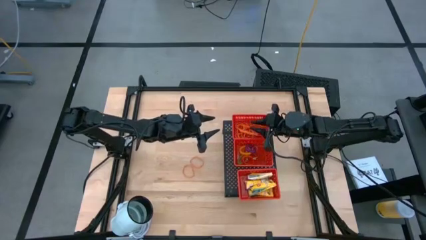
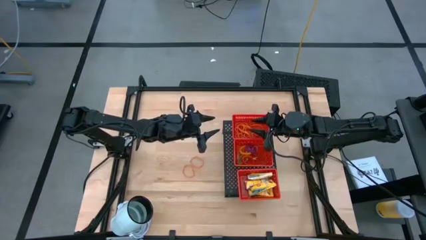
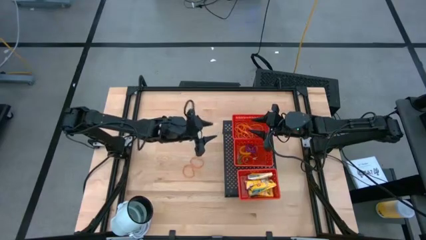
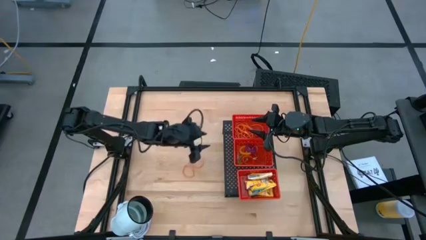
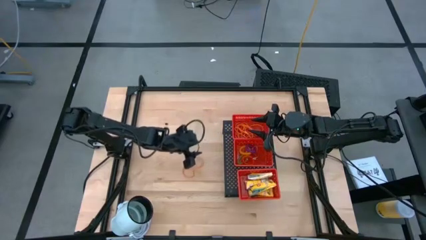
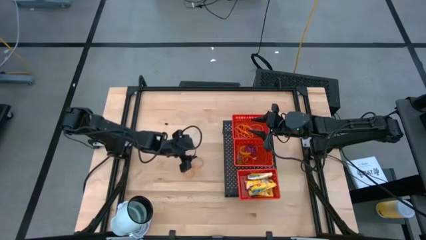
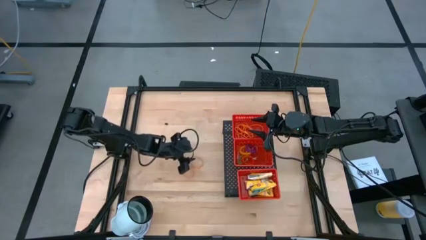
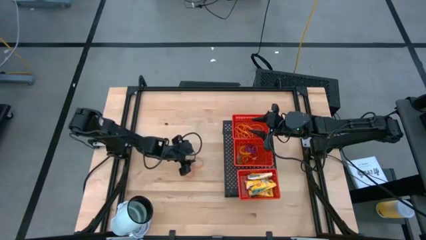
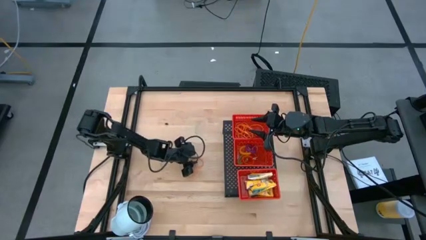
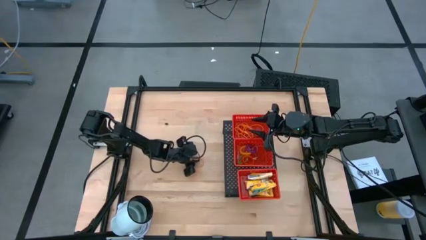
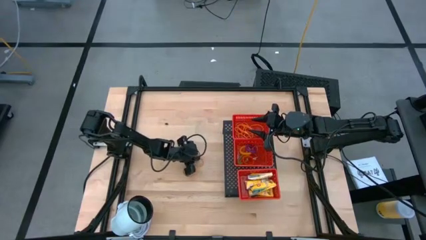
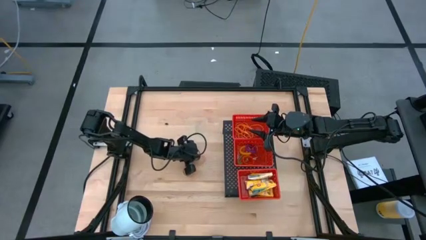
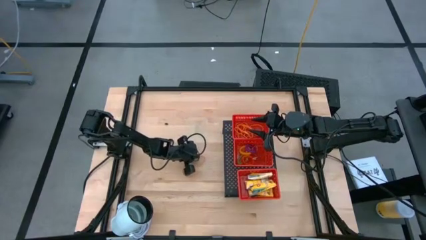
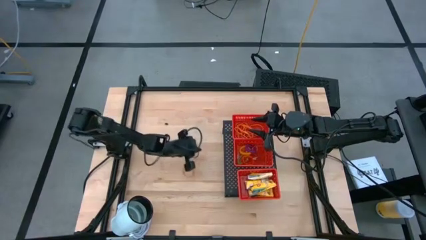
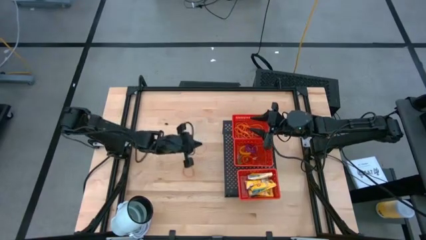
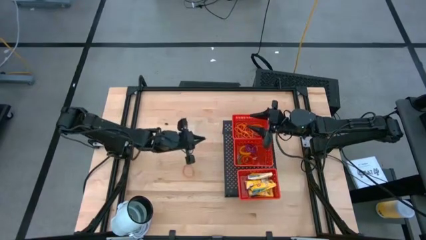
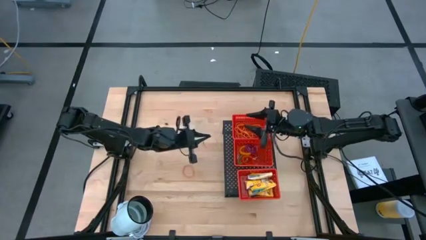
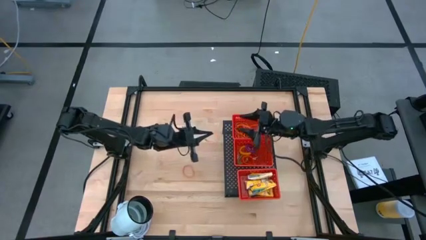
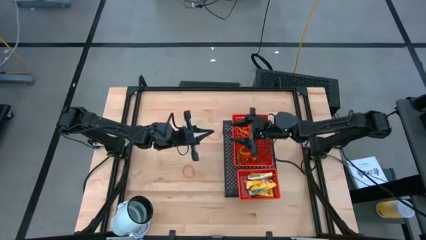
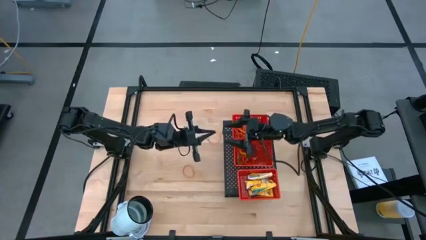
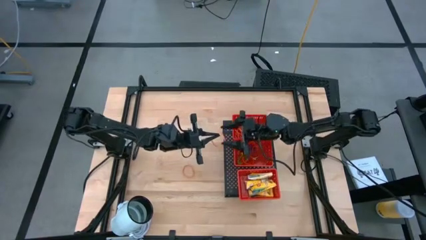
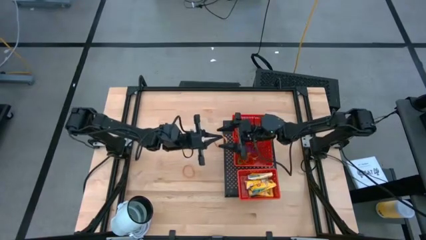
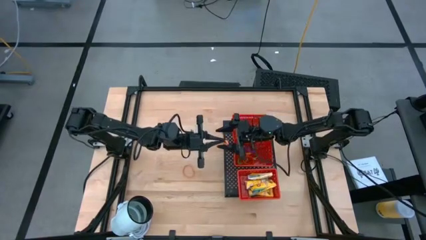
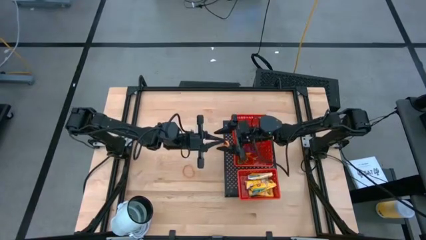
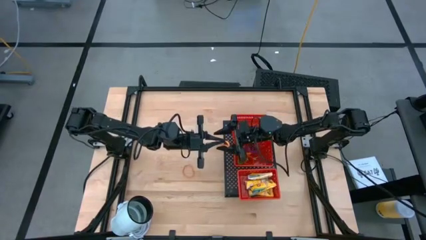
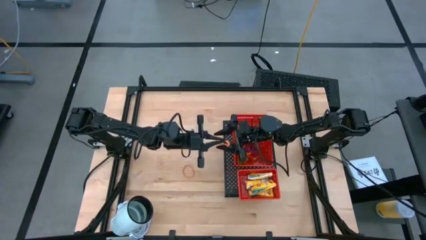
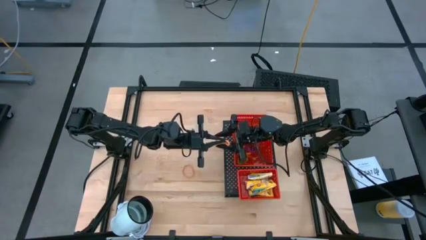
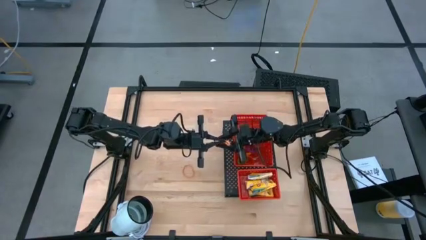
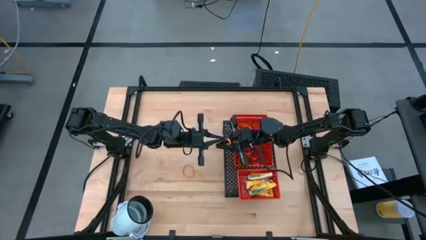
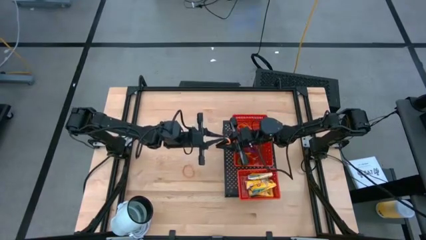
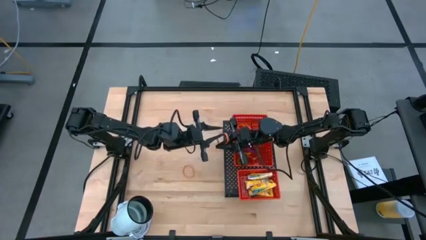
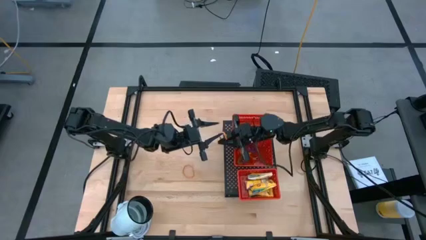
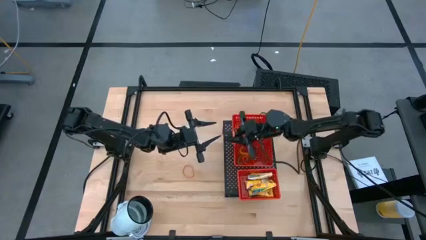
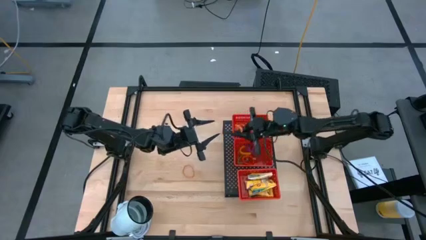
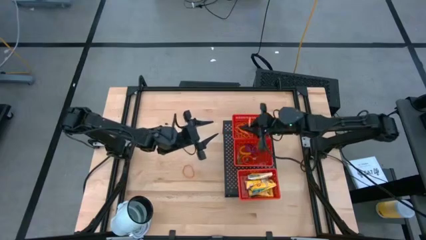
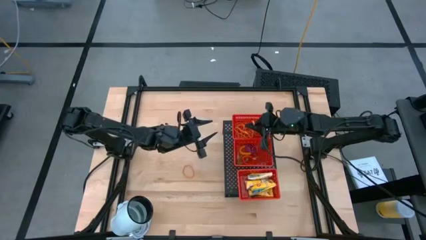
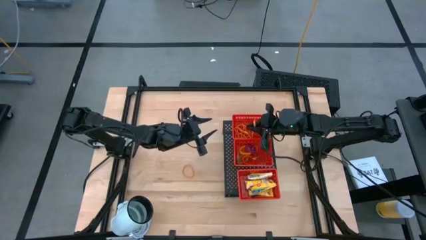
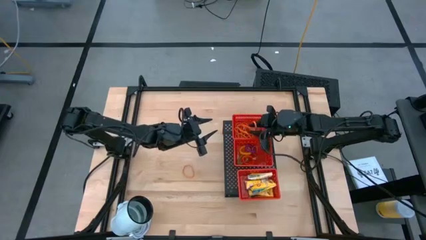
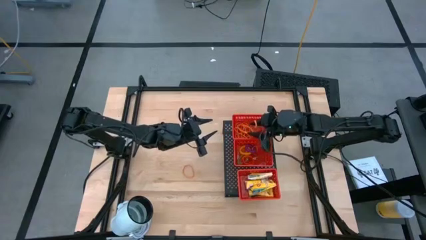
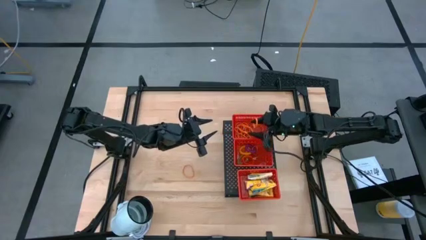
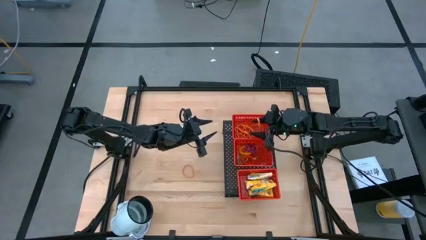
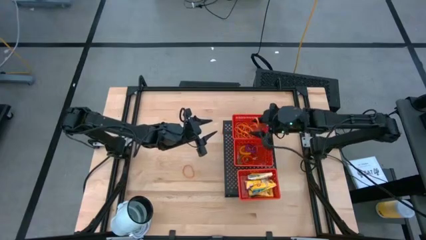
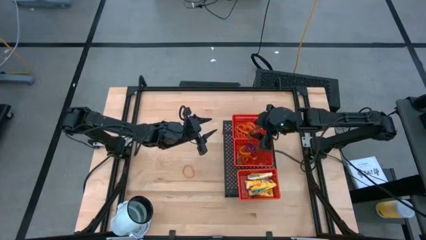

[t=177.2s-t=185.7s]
Task: Pick & Place Office Desk Supplies
Put the orange rubber band into the top red bin on the shelf

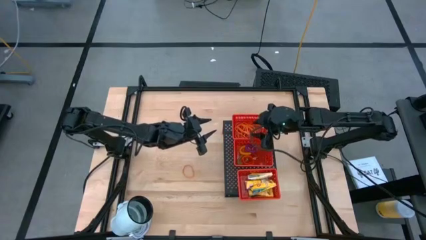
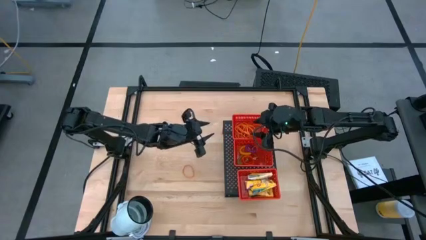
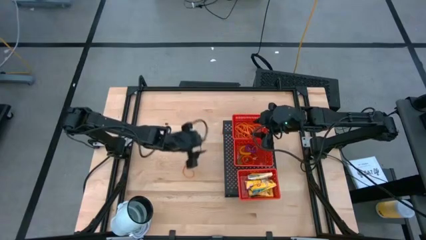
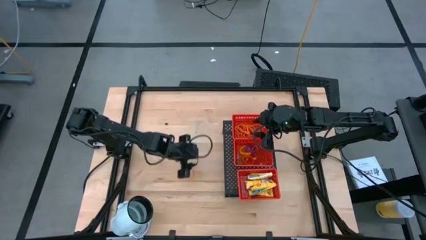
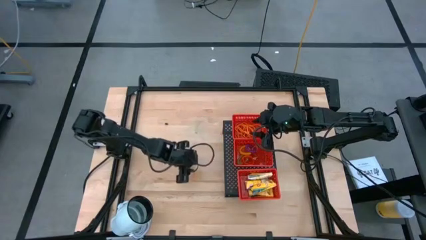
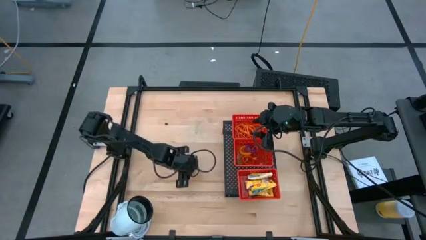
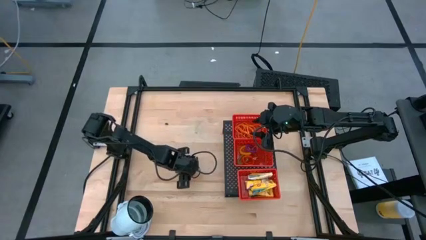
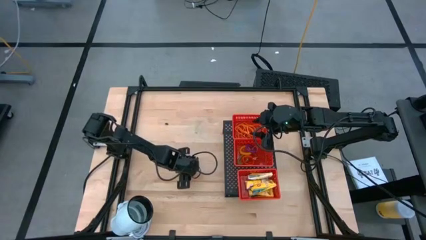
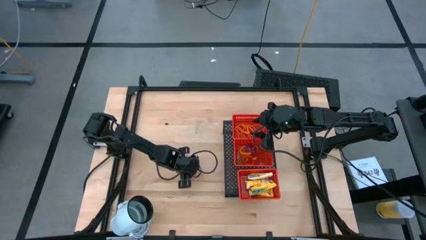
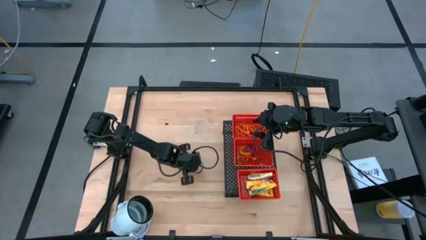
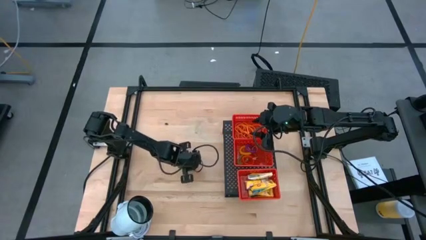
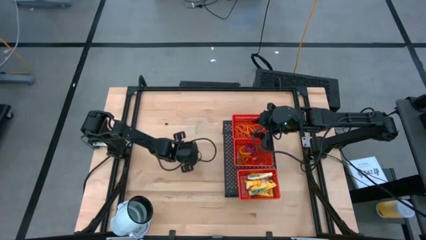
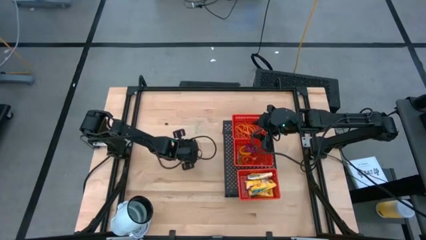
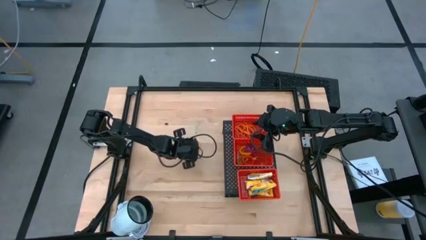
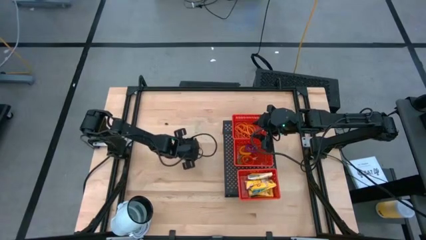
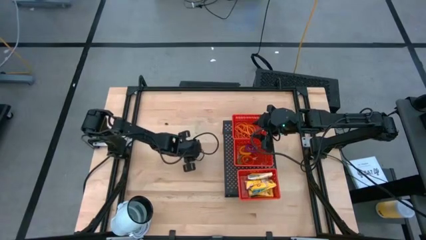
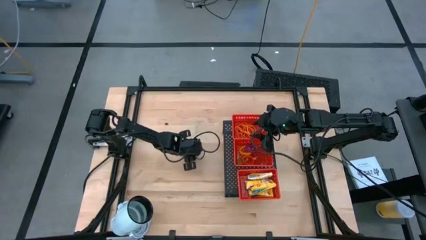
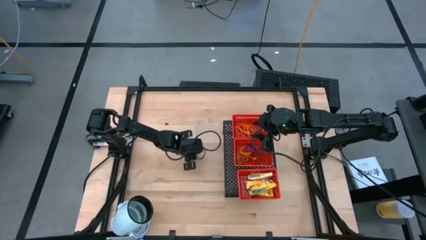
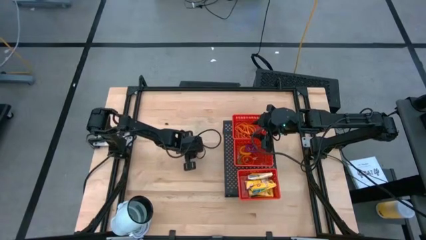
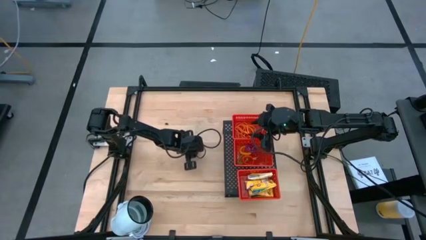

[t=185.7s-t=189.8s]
Put the orange rubber band into the top red bin on the shelf

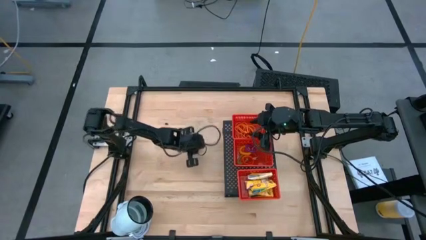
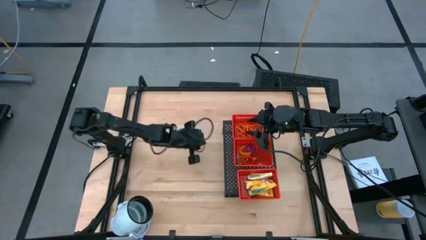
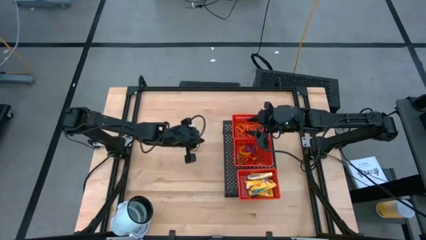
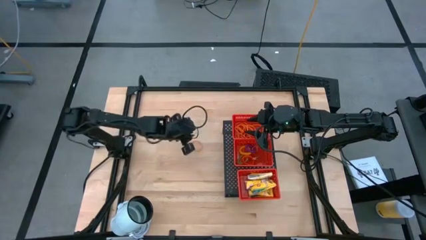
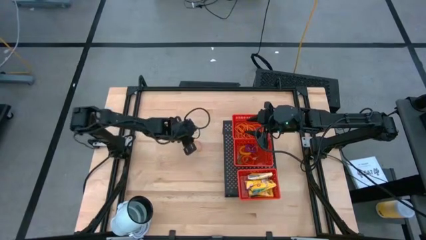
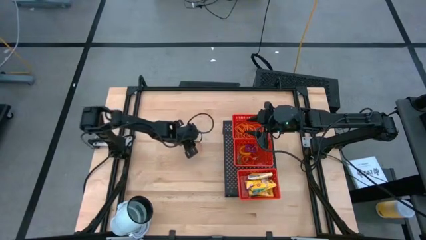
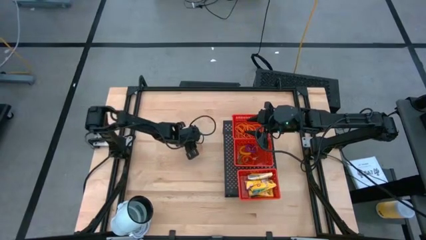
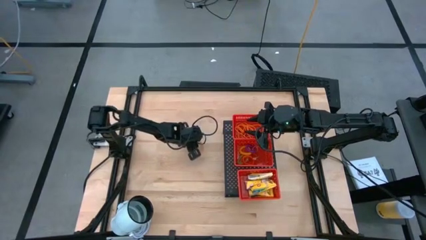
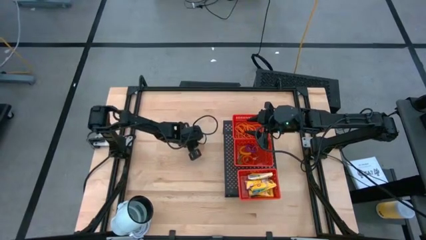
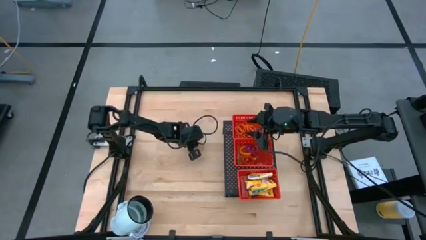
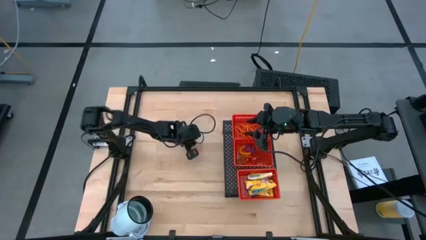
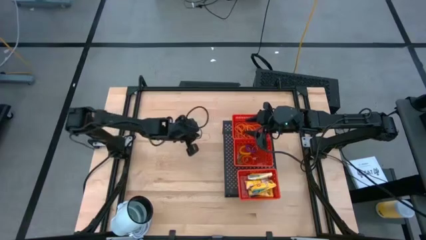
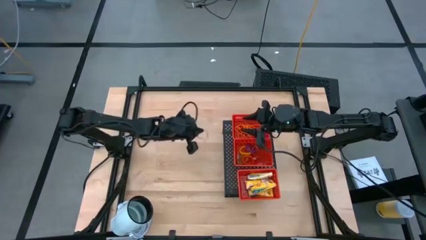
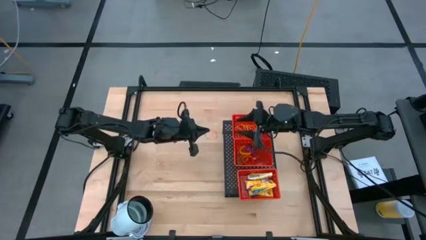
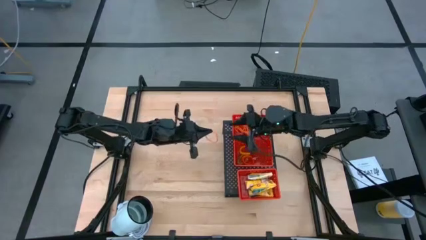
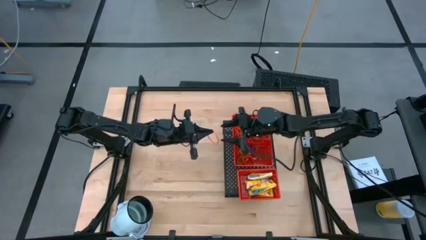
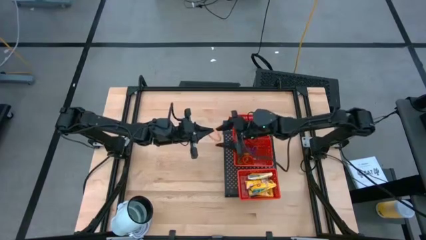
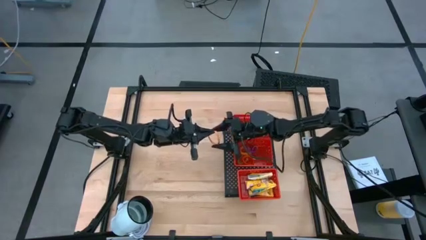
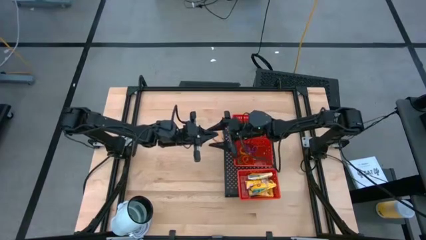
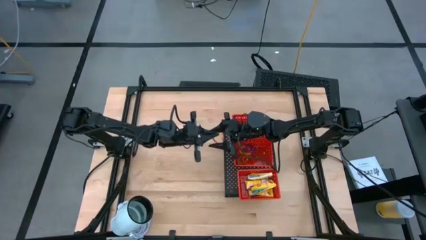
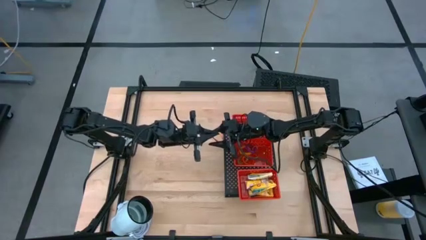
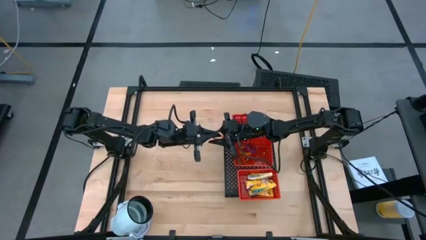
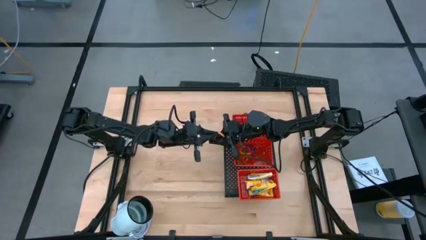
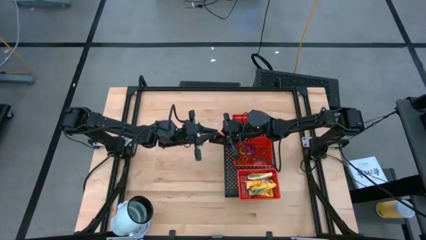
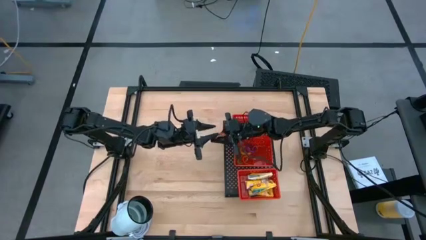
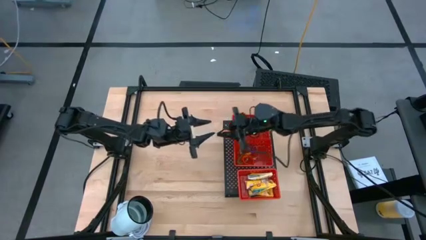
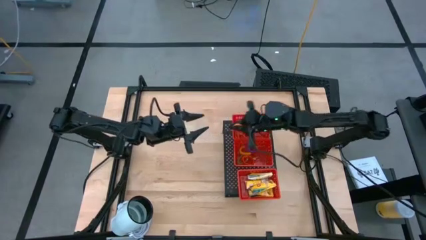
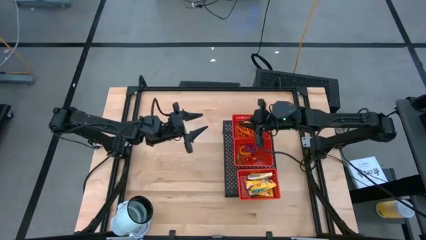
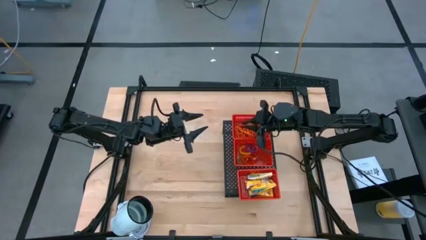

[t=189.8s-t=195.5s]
Put the orange rubber band into the top red bin on the shelf
